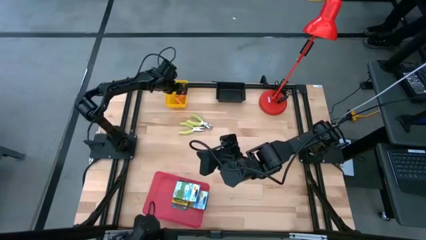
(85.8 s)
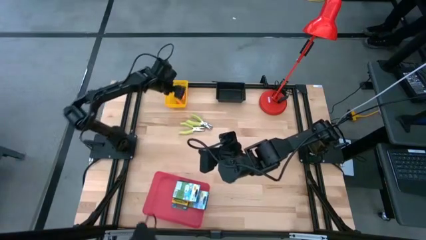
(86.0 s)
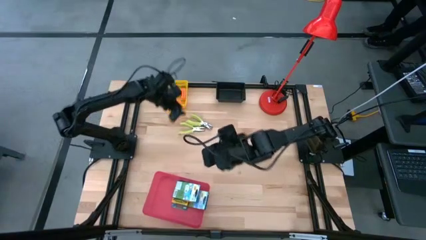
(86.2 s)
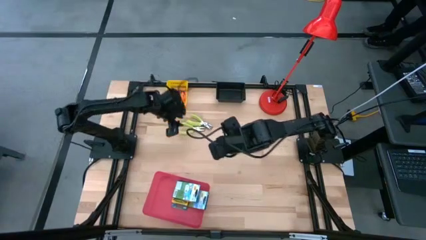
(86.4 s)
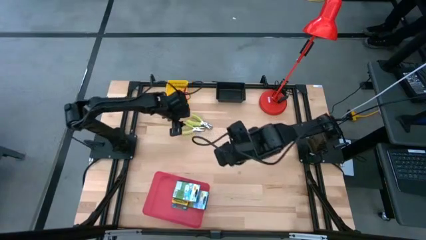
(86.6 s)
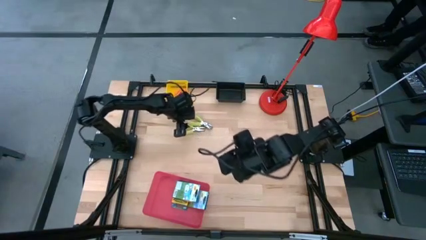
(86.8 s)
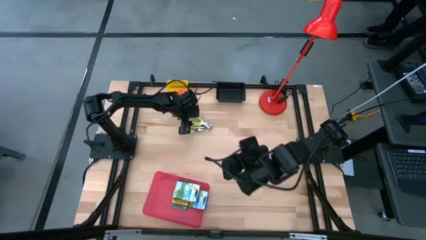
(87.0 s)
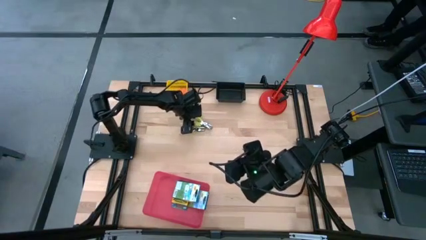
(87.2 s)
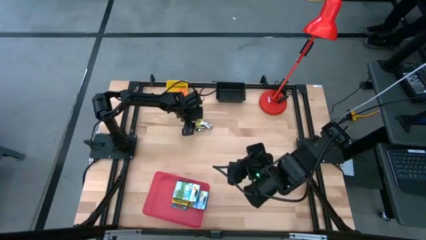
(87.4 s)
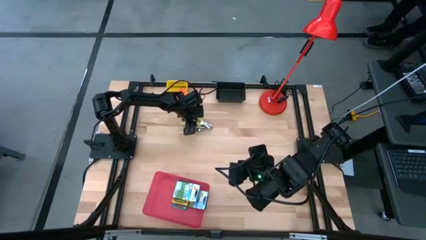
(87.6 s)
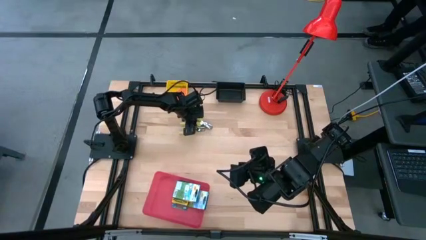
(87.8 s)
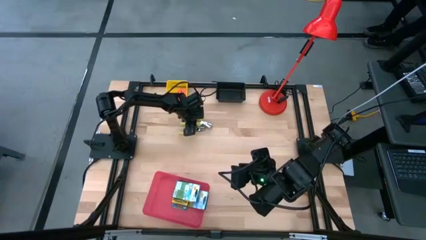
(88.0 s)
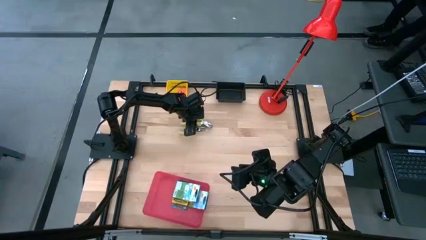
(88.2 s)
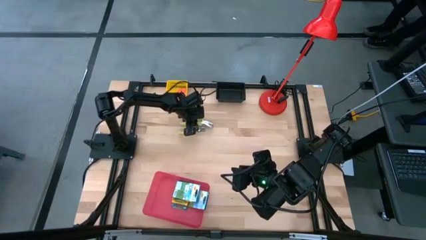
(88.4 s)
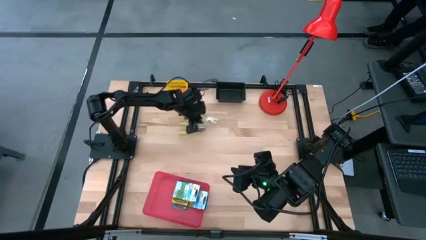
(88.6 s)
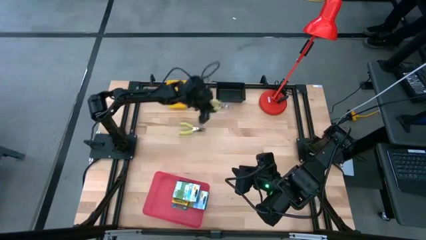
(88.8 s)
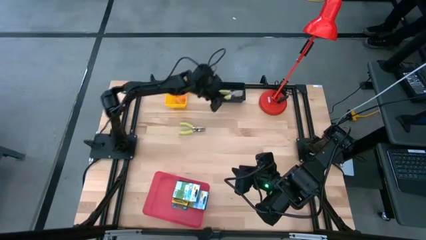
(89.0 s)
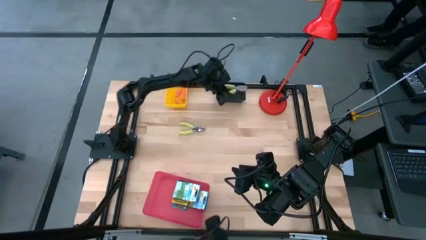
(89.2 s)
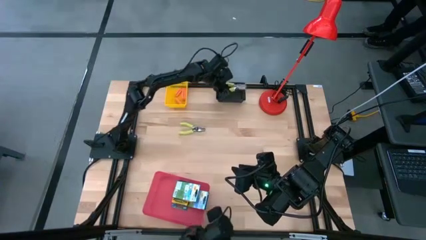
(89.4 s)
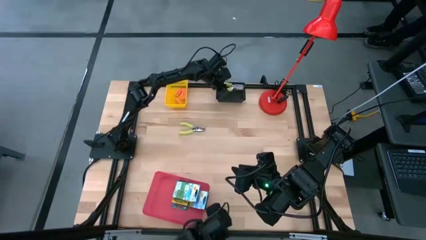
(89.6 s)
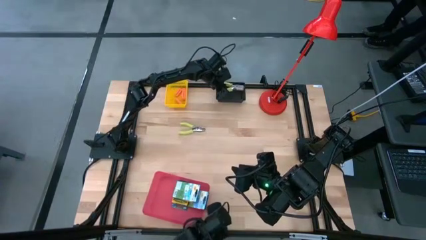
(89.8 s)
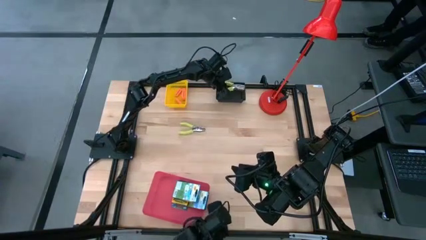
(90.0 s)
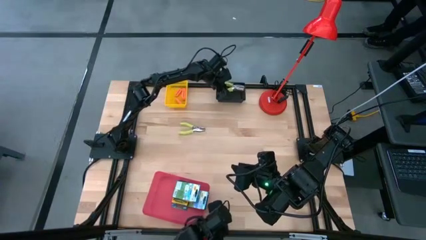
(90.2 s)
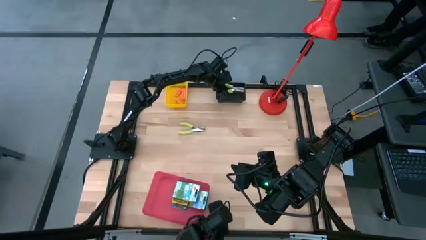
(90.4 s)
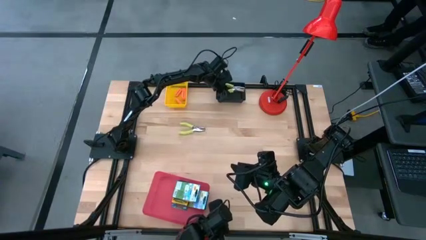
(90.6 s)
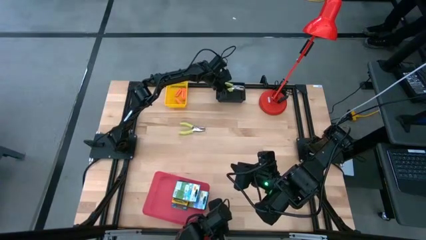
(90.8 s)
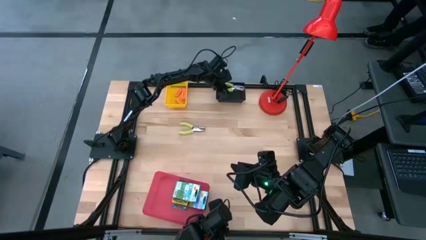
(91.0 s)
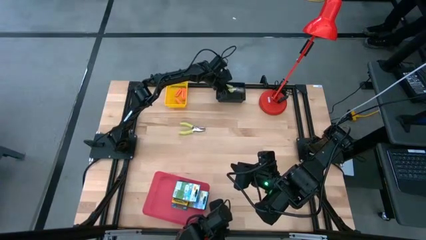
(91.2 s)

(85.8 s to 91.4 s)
Task: Pick & Place School Supplies
Put the green puncher into the black bin

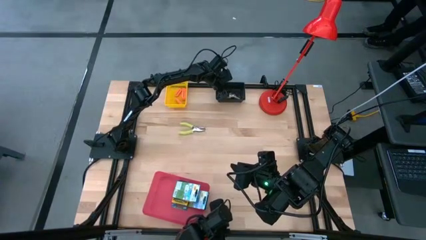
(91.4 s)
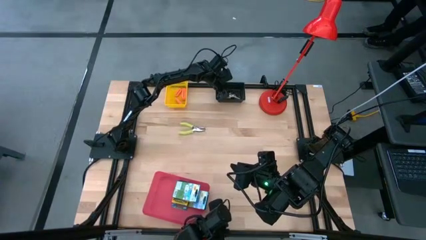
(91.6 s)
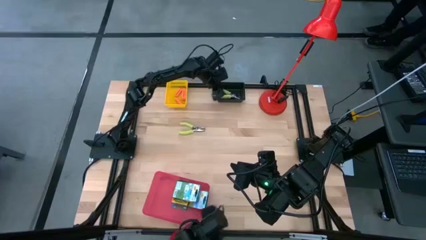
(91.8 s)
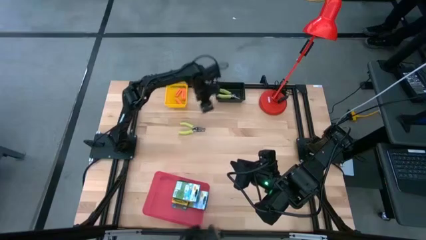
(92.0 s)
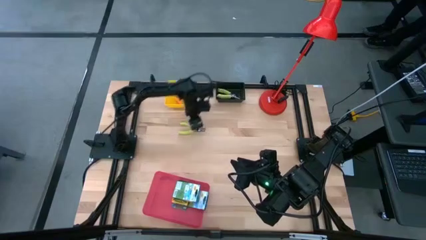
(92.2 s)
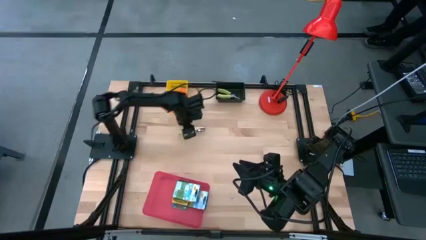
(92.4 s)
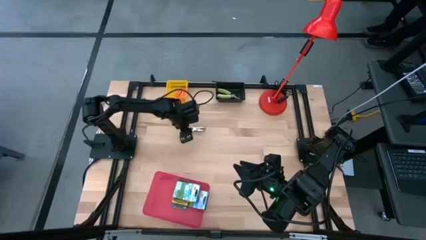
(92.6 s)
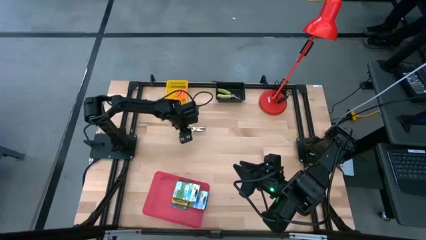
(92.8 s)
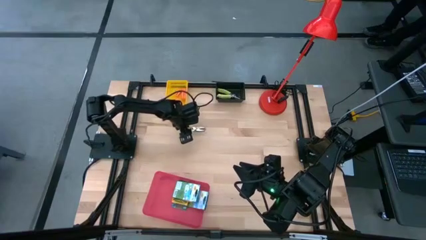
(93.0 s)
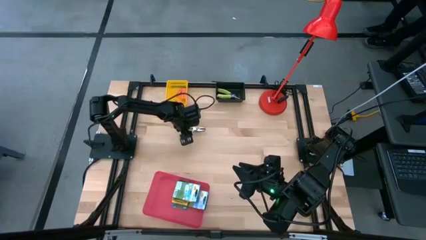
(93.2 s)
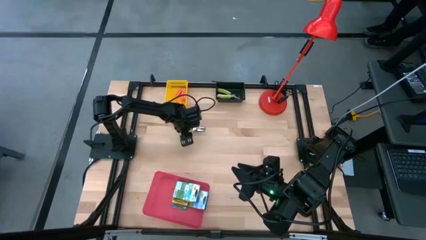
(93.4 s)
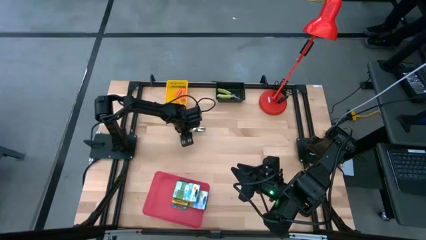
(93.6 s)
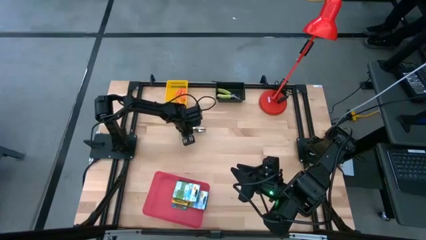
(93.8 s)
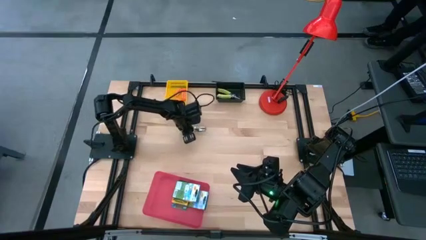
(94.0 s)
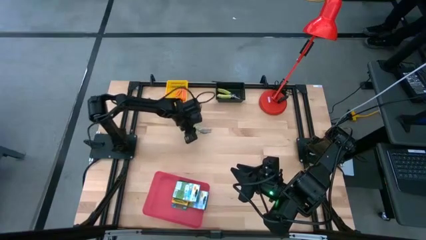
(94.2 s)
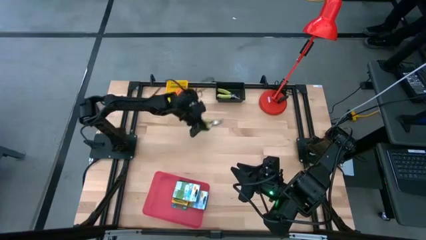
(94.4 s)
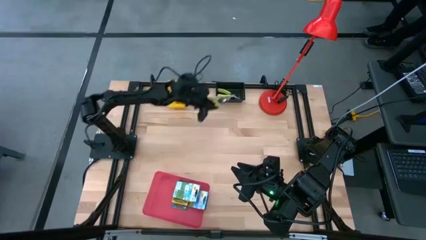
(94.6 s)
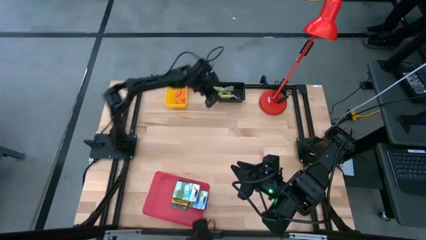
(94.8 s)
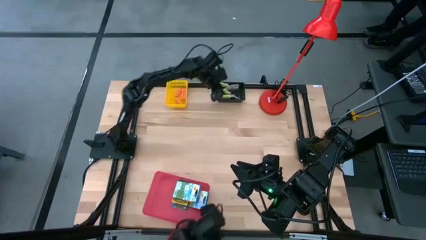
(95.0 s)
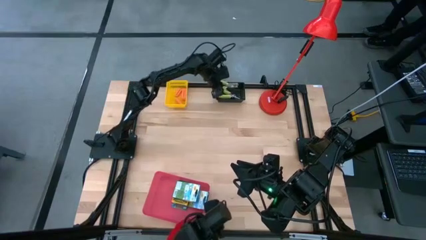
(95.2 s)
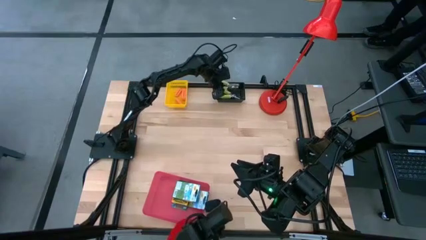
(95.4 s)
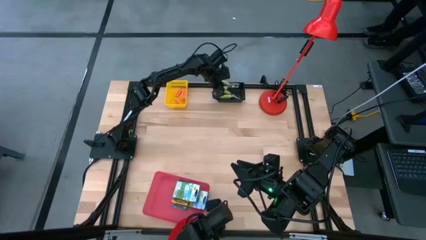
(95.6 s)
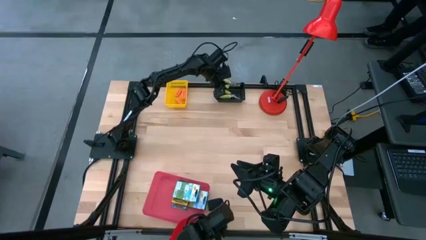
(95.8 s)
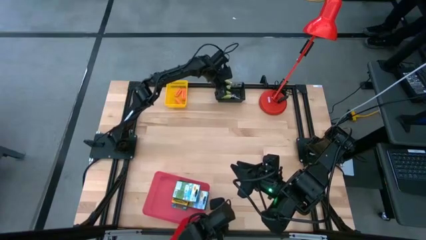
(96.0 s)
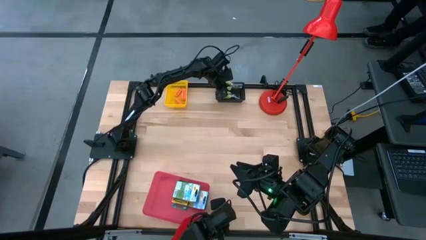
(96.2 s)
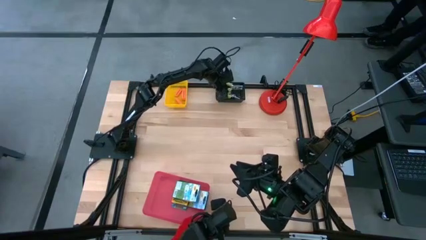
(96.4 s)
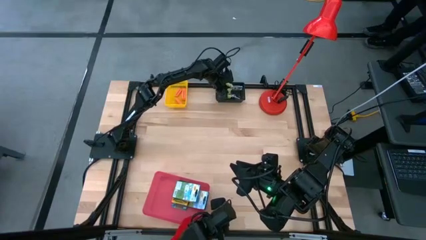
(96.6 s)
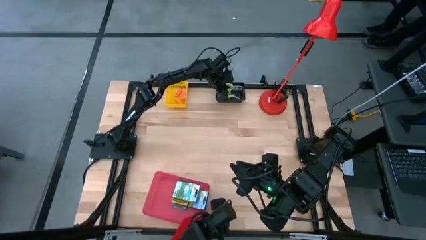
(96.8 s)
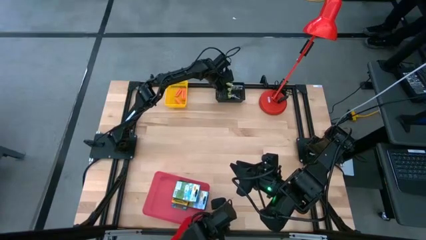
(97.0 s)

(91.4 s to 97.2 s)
Put the green puncher into the black bin

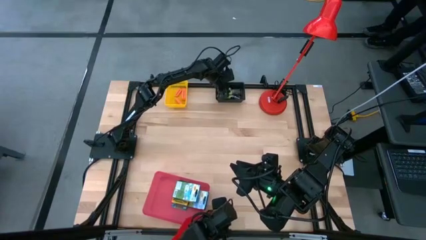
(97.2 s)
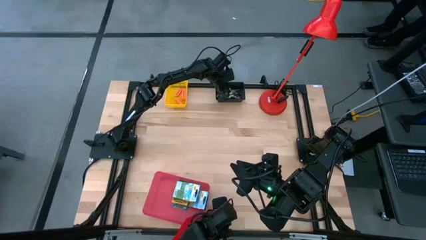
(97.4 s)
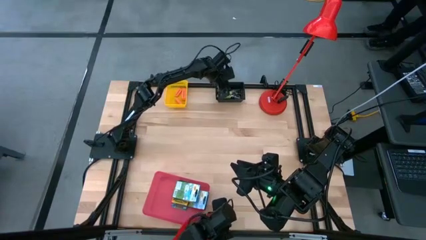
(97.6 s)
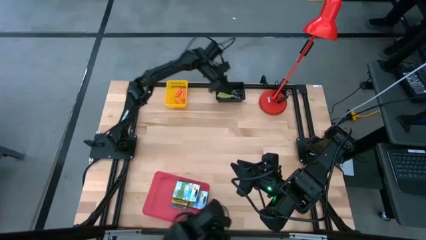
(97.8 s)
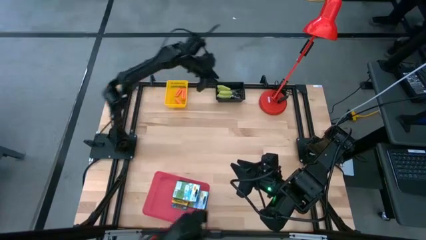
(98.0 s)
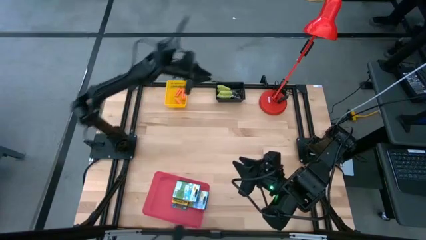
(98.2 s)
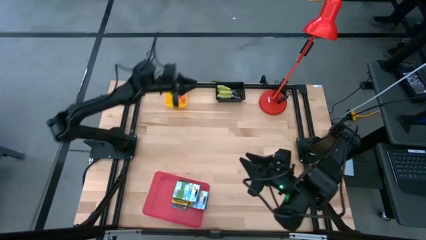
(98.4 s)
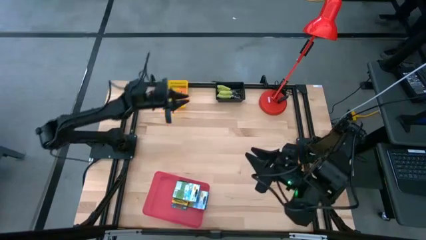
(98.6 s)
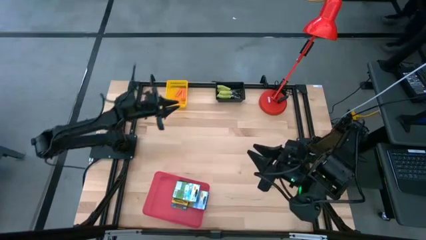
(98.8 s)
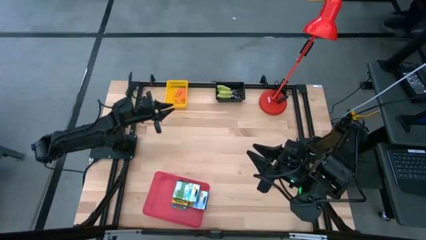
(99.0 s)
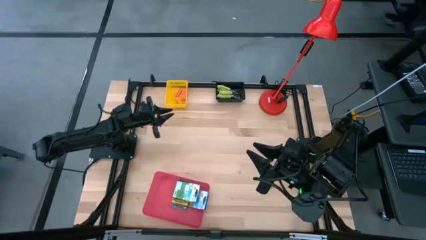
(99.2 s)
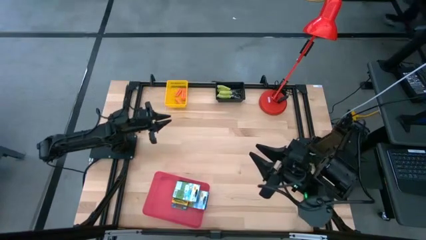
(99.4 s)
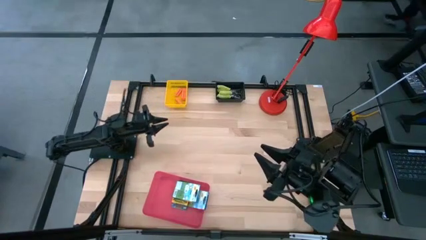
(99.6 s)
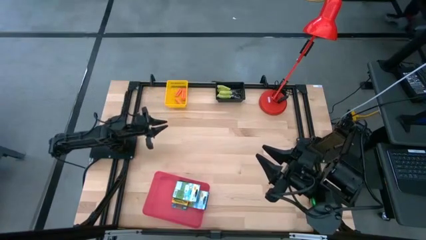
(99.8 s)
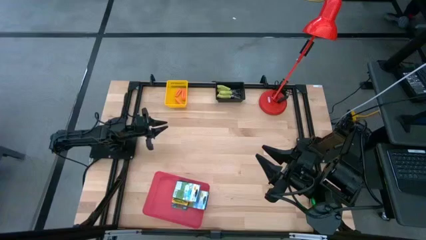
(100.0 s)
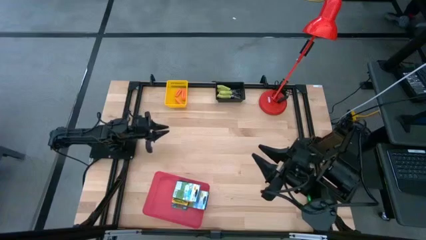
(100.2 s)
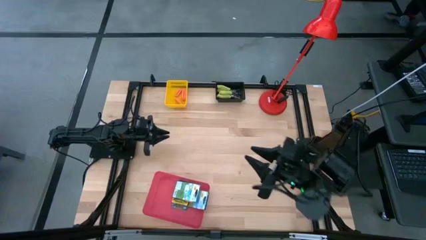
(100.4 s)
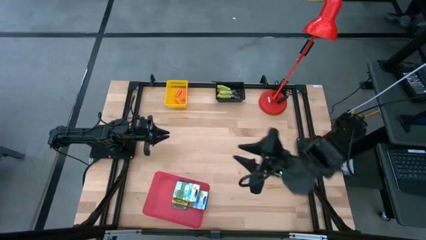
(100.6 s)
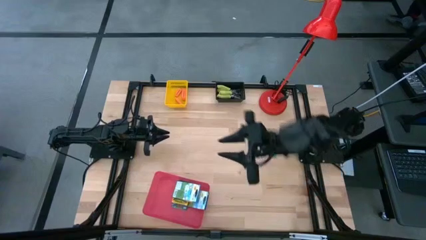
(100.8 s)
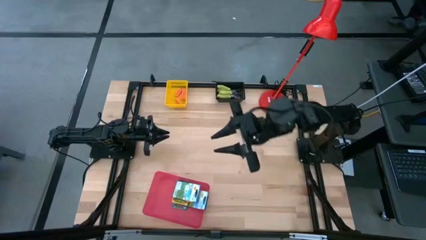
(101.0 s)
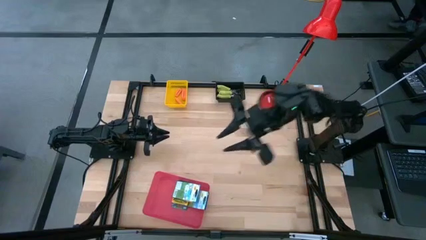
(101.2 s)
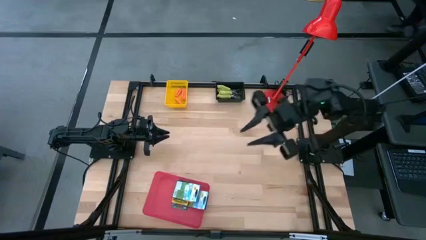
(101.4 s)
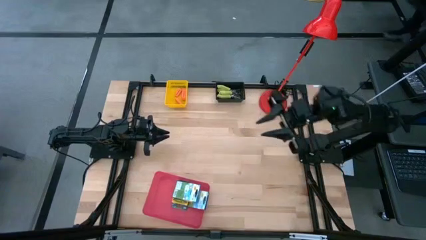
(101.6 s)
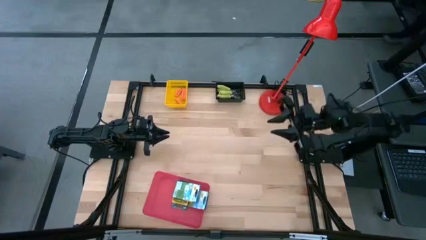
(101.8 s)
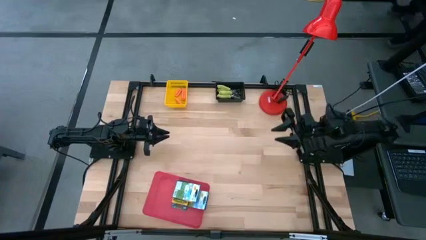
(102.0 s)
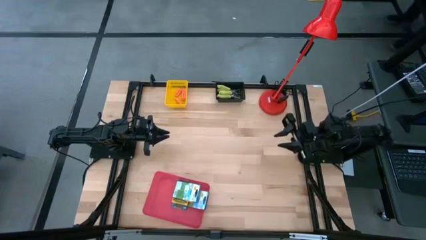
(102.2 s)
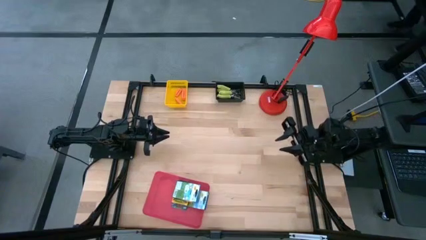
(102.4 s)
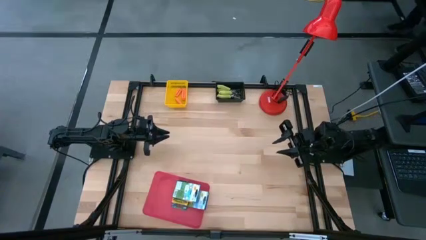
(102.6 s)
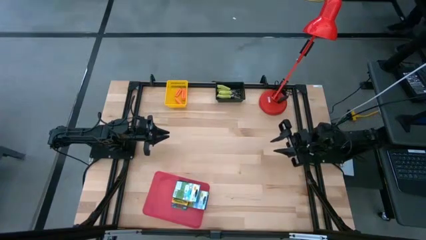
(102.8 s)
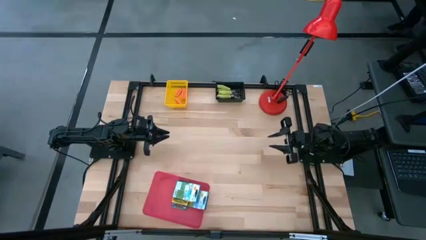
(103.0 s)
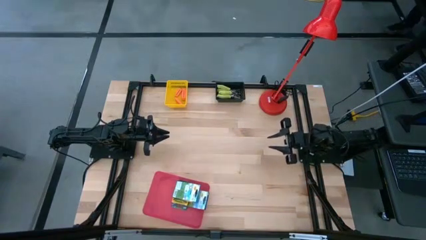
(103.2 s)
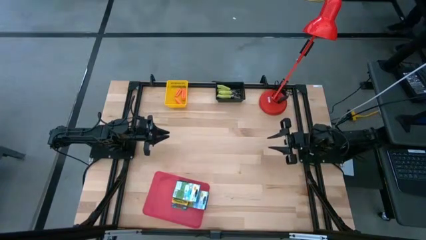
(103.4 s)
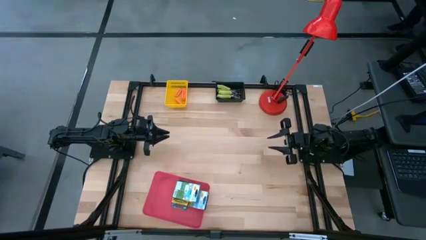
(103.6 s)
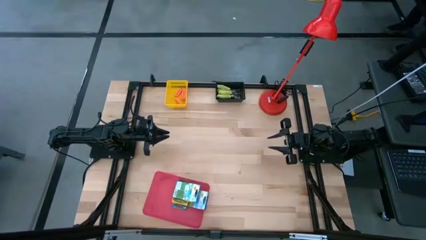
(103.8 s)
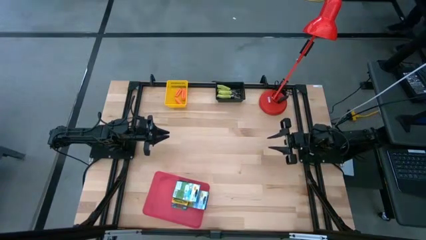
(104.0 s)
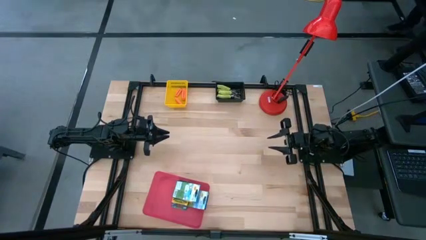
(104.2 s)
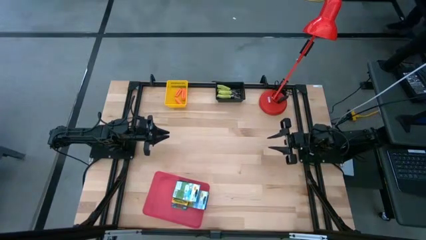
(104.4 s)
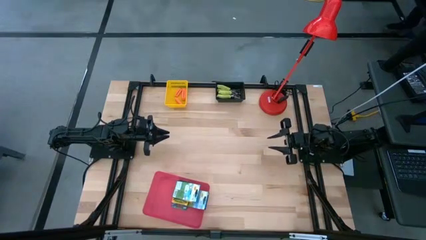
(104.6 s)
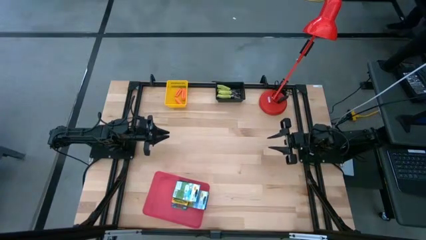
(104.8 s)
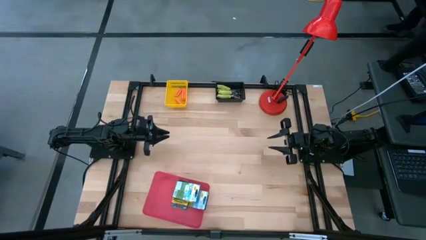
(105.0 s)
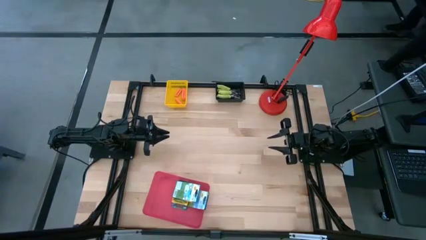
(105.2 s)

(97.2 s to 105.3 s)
Return to Home Position
